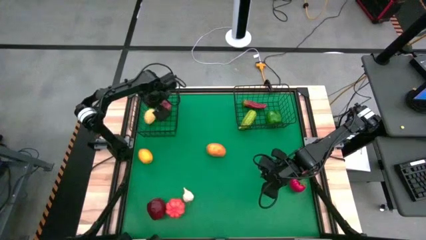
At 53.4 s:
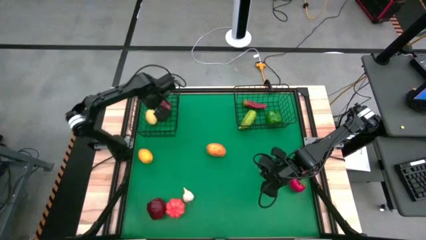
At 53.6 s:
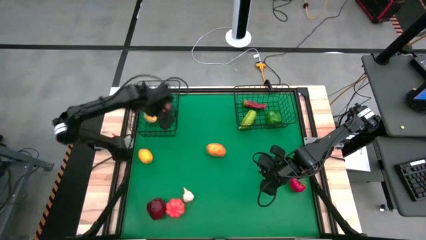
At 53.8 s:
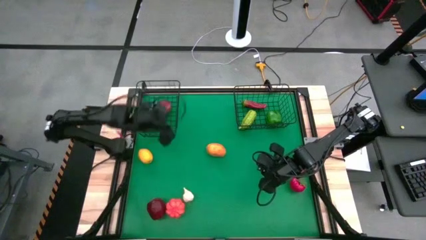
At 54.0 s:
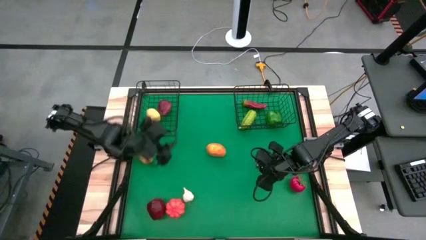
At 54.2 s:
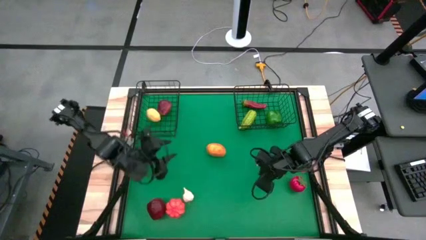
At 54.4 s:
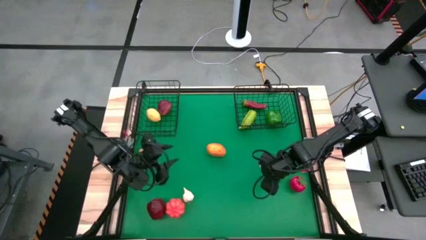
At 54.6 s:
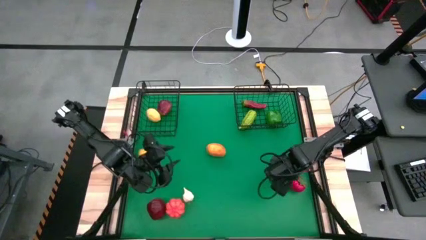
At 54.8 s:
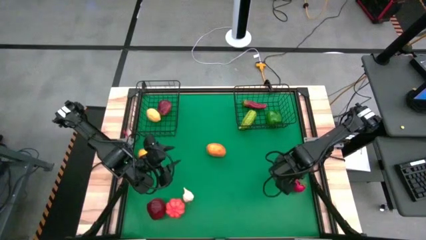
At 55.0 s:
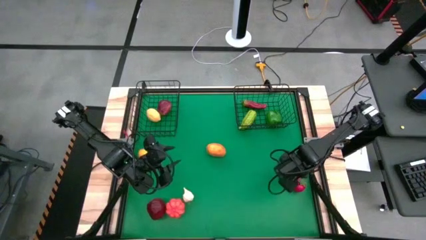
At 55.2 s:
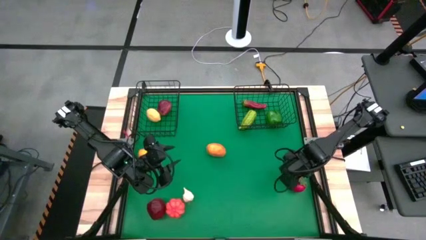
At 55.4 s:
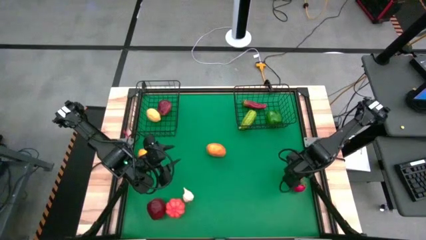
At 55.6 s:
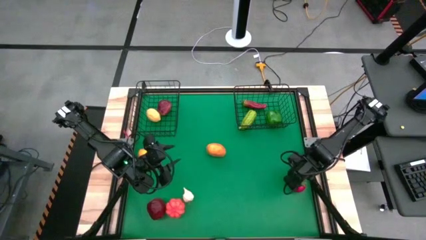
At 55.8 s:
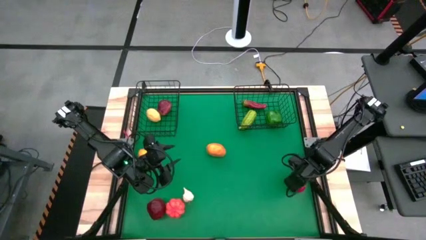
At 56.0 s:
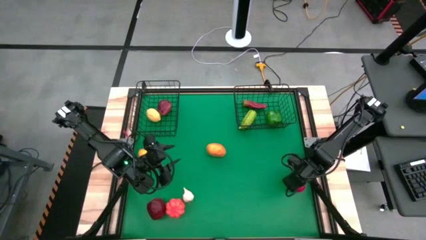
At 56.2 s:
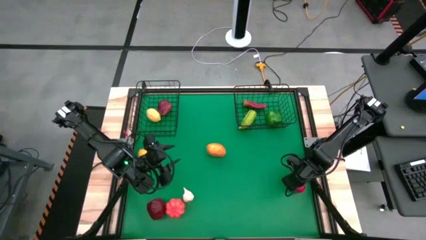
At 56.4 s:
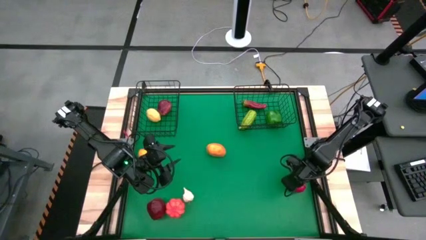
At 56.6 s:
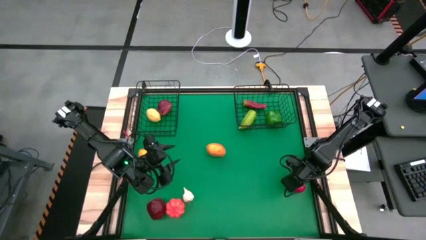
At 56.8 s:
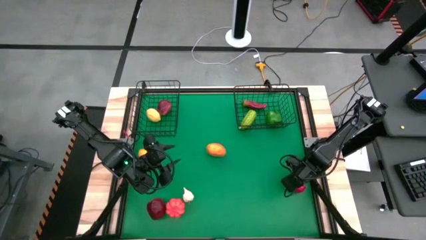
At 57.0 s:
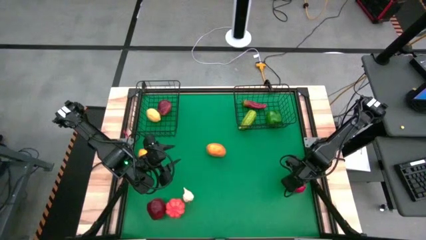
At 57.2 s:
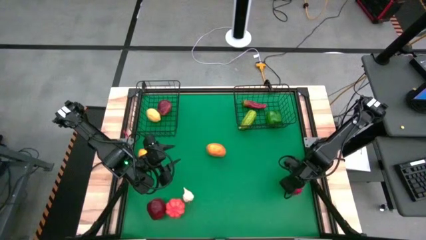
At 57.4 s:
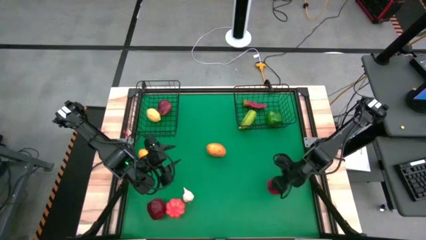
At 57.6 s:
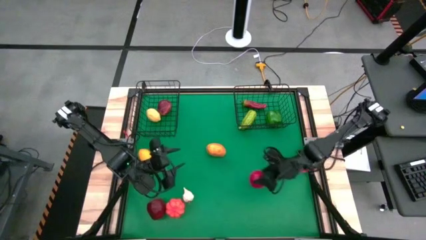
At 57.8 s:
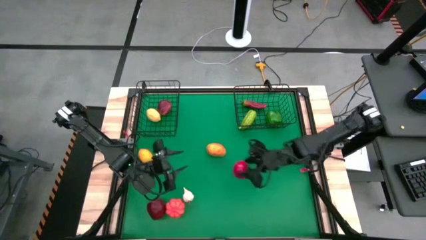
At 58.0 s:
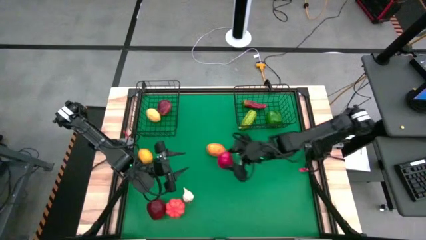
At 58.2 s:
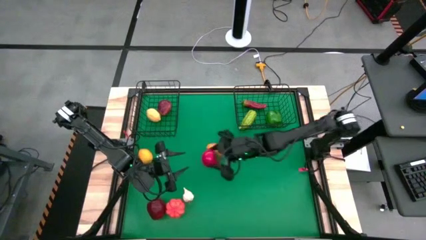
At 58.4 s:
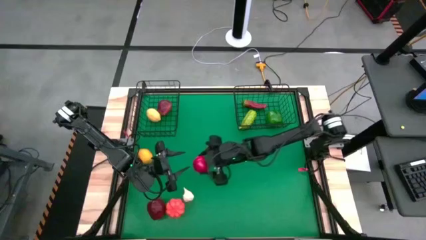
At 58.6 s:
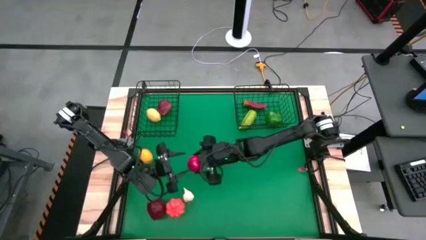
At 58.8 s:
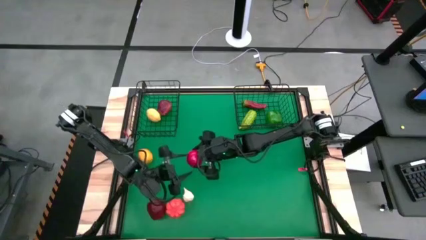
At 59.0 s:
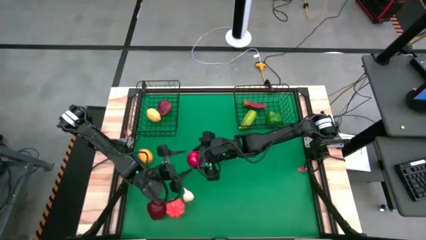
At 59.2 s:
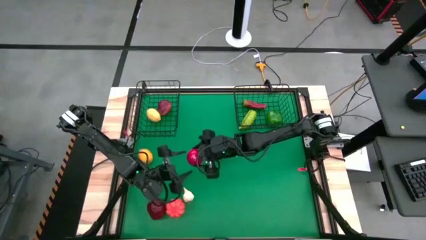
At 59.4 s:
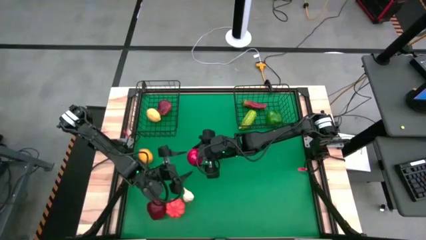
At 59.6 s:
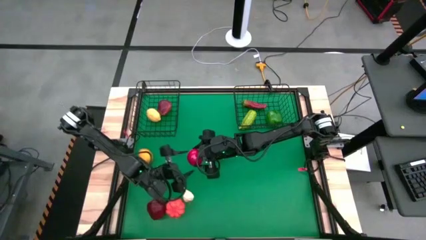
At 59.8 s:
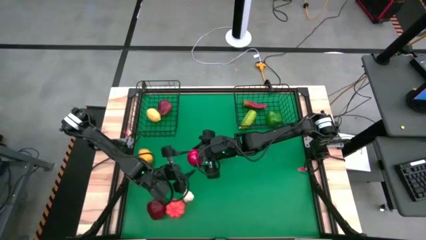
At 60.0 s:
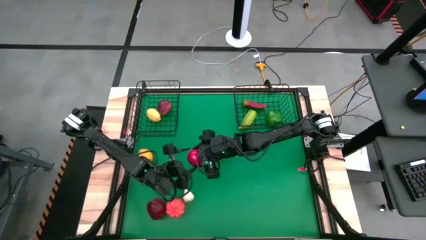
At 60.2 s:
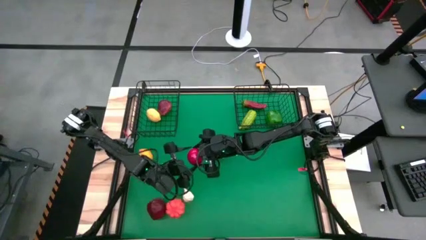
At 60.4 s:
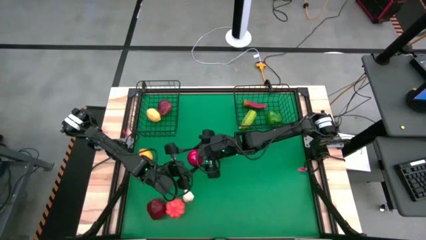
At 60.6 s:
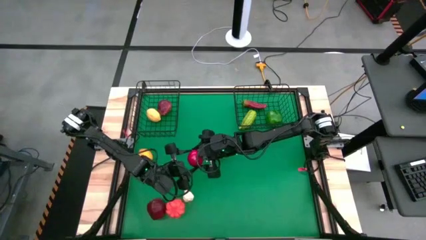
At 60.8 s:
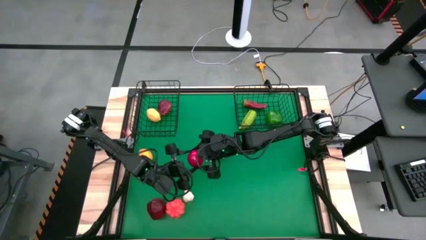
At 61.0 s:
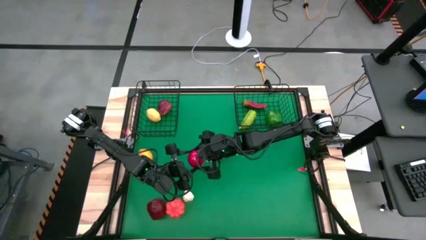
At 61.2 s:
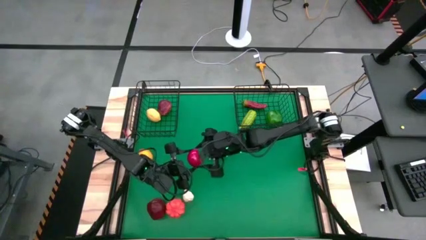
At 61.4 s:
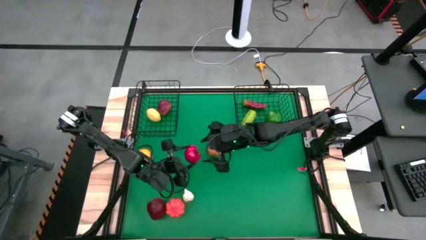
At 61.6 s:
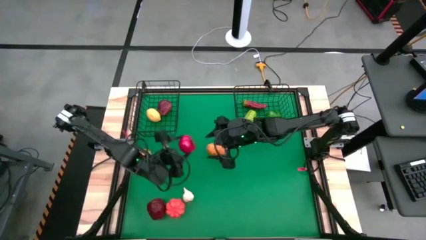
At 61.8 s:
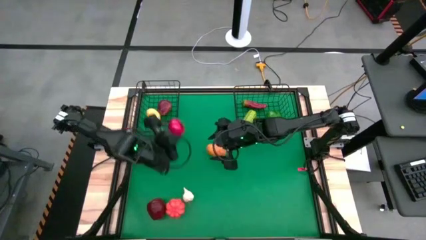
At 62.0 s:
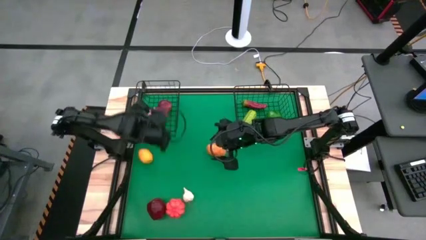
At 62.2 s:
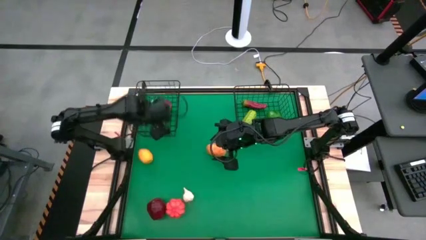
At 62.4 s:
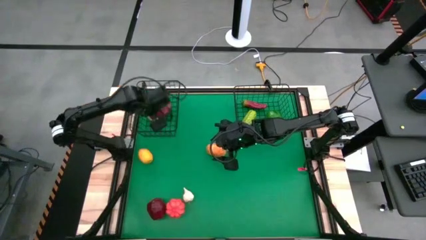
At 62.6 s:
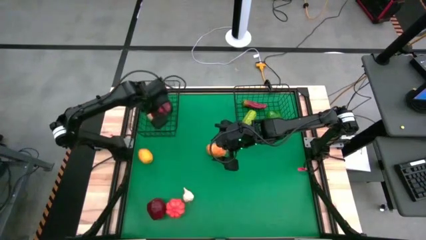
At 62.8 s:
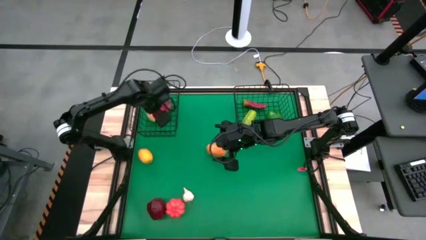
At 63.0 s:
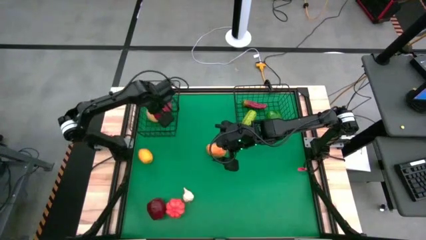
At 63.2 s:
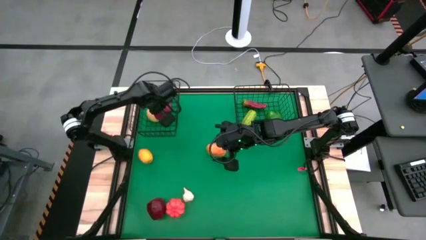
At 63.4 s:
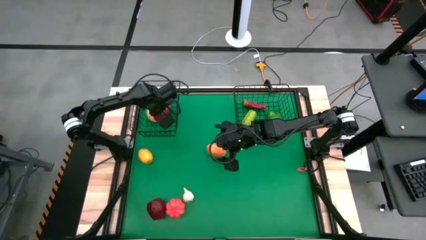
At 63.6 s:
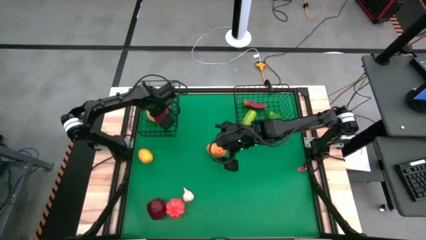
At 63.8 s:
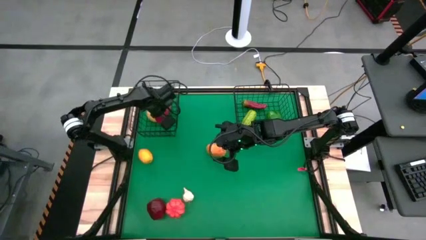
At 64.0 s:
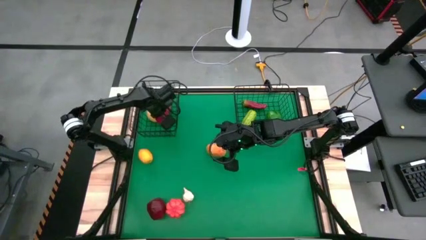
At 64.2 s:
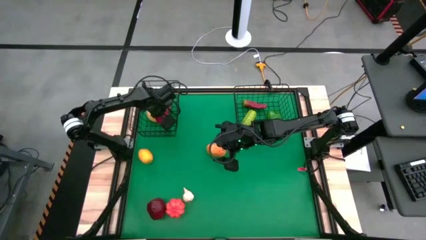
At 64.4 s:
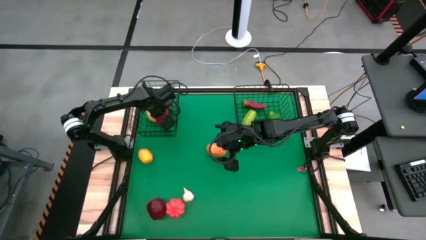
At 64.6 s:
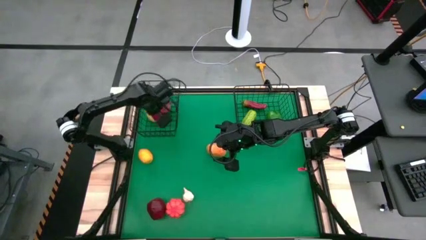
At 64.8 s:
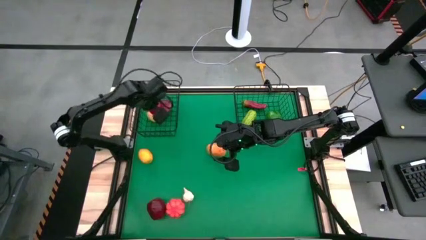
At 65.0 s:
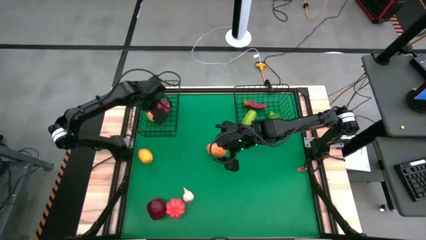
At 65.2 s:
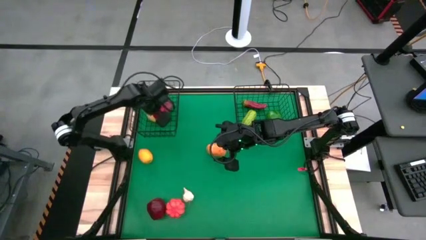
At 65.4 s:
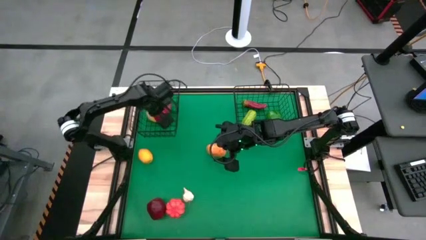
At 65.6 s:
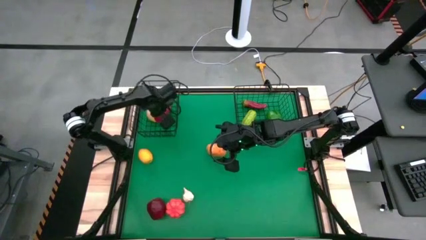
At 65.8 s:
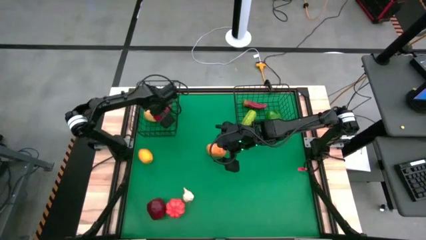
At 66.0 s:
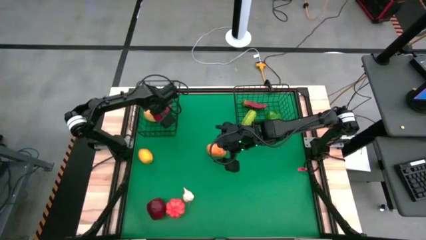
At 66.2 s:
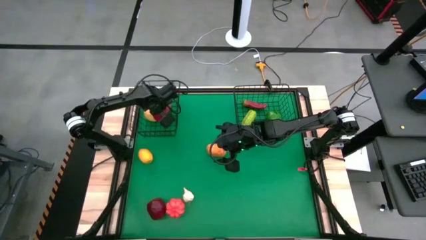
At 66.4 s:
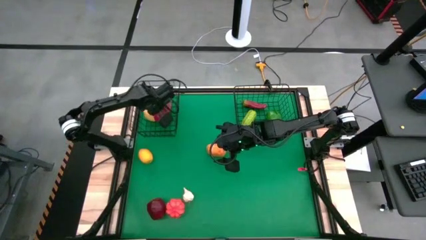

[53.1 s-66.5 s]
Task: Sort produce into baskets
Put the red tomato into the left wire basket

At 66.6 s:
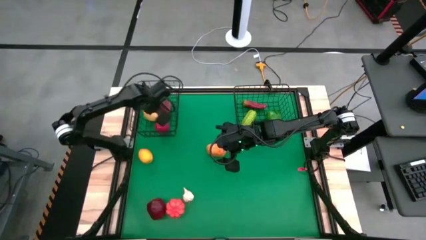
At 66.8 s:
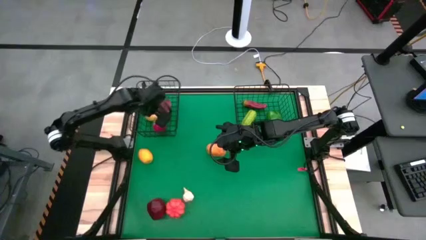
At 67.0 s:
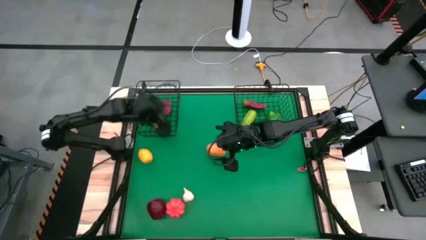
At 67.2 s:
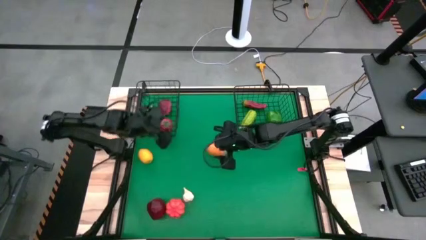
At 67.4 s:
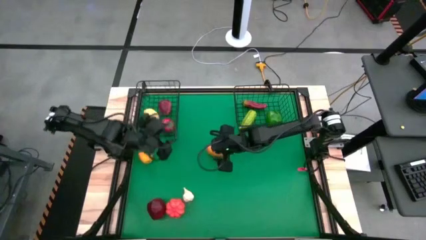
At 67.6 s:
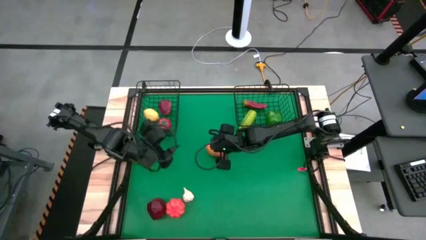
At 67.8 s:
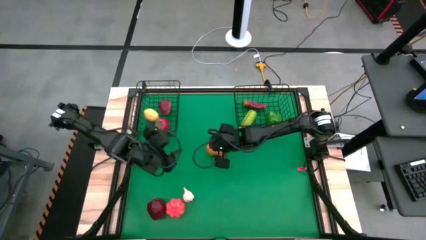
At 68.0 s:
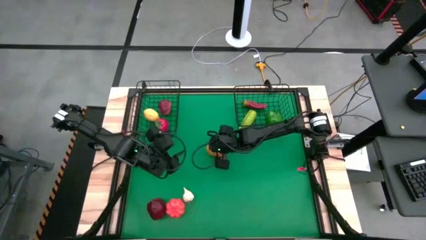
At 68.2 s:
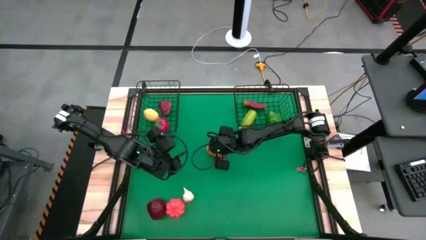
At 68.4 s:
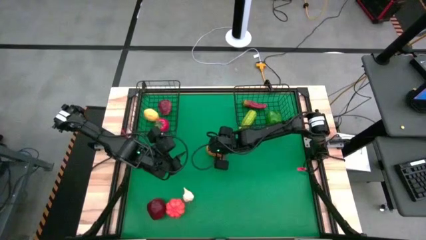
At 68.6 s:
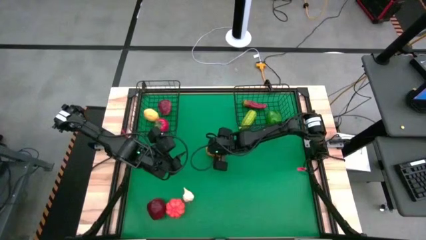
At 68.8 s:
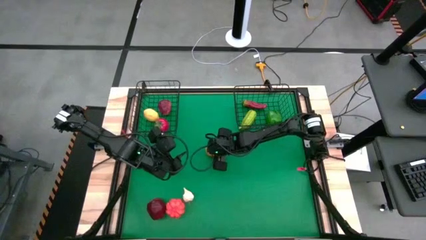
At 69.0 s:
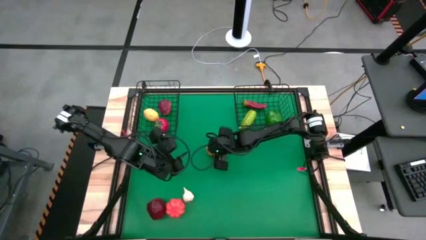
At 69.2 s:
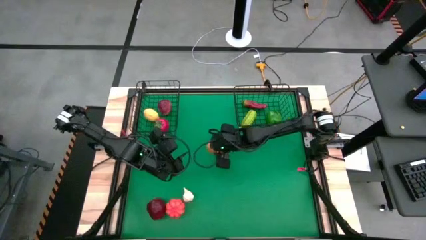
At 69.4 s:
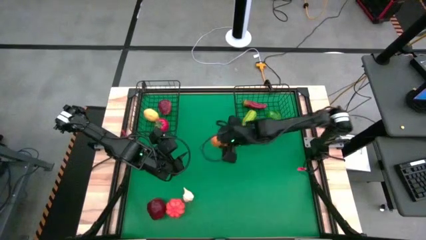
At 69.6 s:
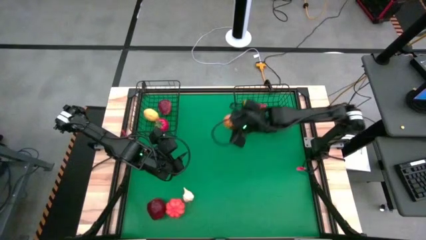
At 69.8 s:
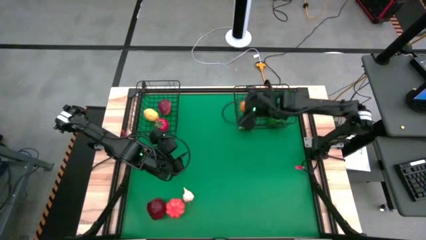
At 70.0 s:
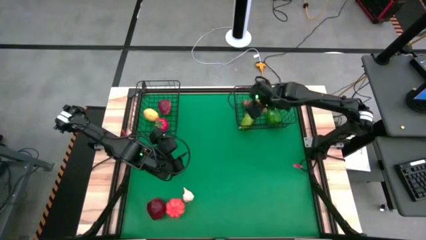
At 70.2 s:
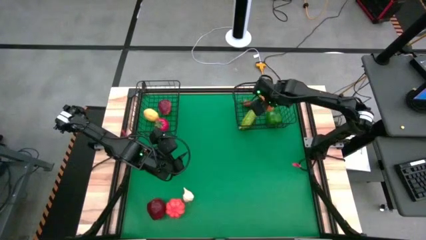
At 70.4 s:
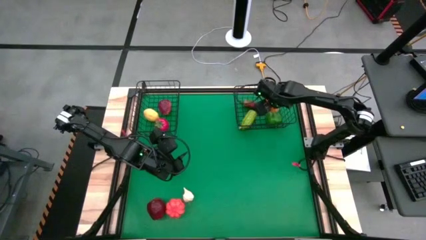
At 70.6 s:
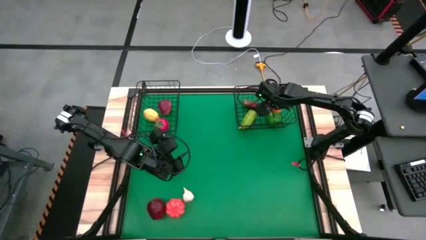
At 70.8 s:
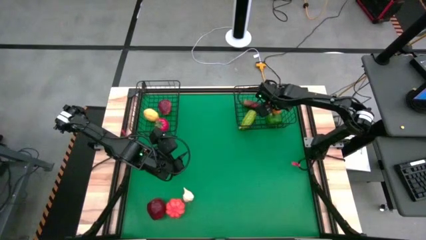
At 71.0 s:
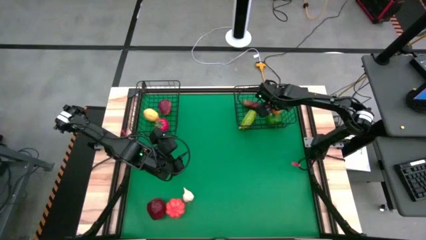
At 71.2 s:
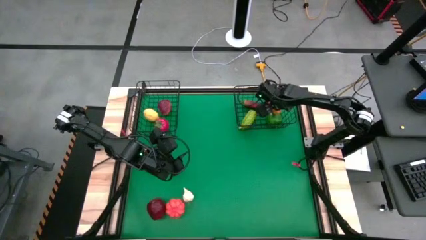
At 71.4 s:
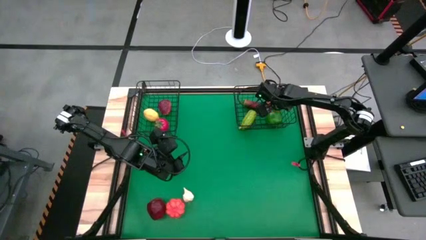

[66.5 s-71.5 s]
Put the brown potato into the right wire basket
